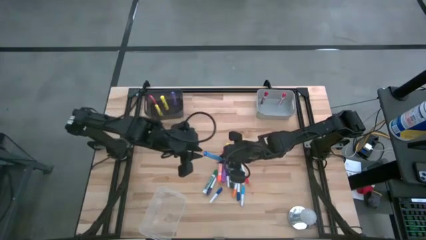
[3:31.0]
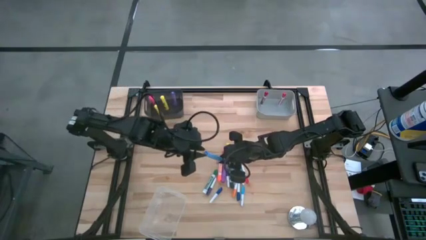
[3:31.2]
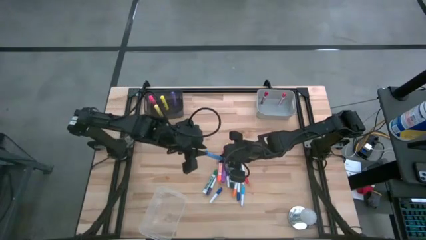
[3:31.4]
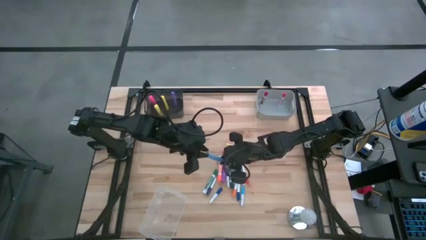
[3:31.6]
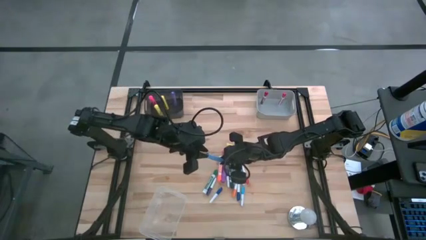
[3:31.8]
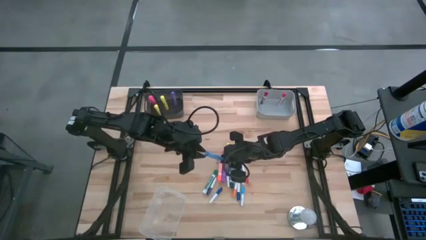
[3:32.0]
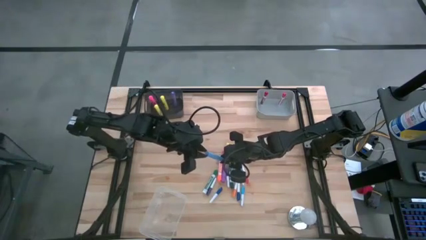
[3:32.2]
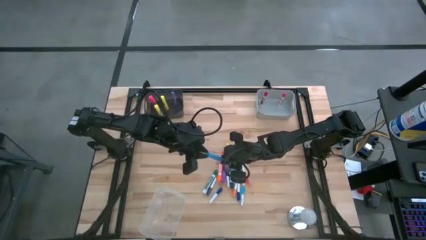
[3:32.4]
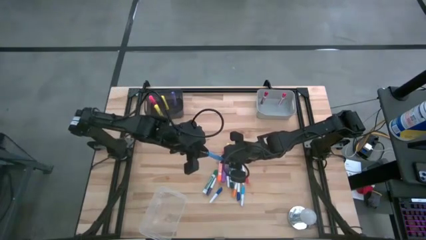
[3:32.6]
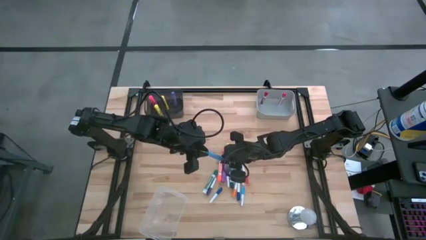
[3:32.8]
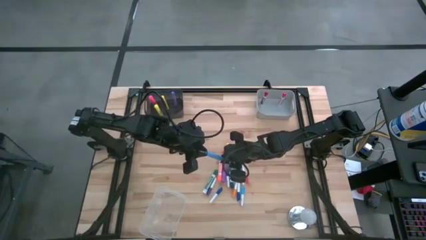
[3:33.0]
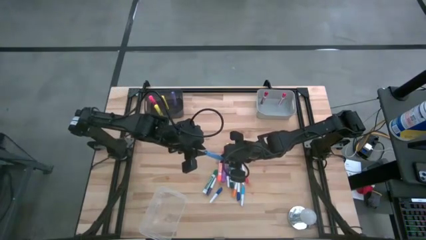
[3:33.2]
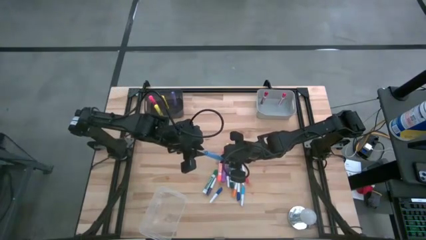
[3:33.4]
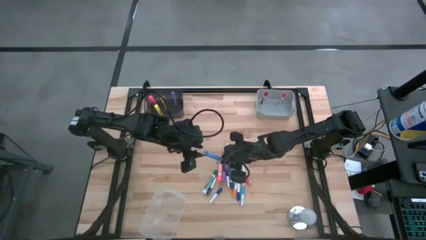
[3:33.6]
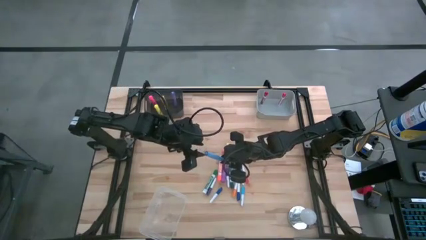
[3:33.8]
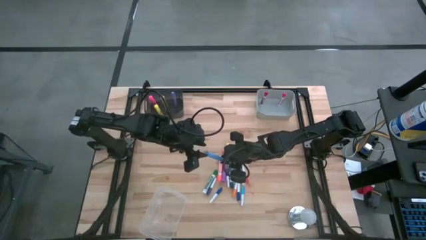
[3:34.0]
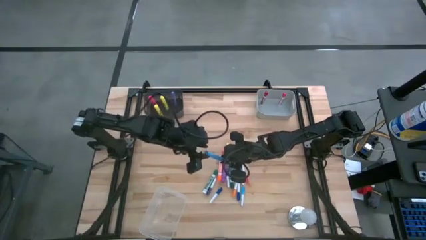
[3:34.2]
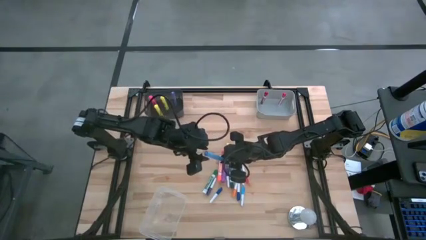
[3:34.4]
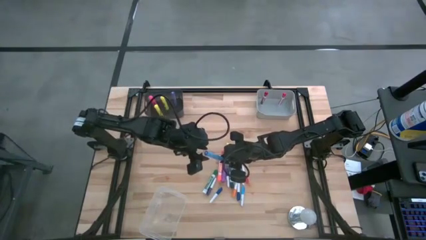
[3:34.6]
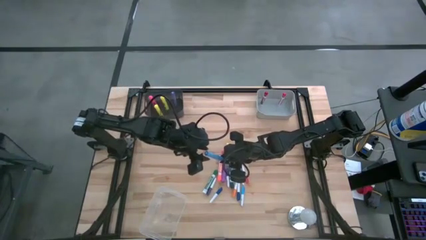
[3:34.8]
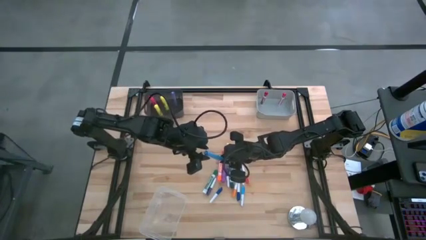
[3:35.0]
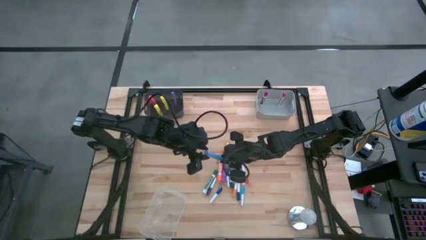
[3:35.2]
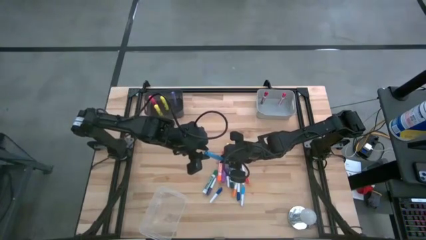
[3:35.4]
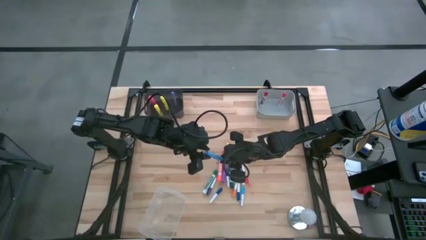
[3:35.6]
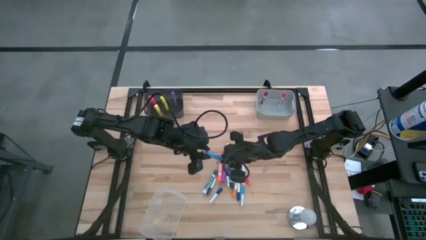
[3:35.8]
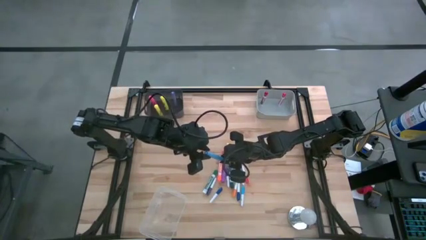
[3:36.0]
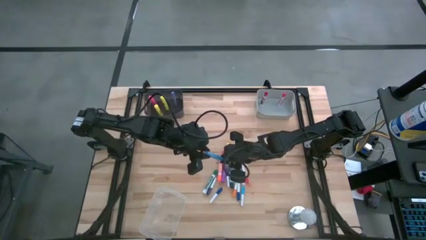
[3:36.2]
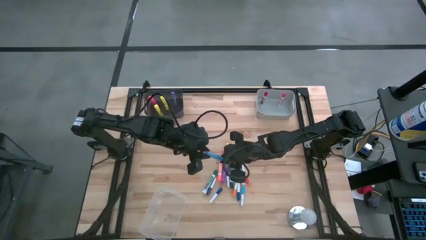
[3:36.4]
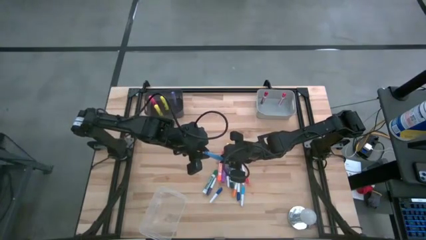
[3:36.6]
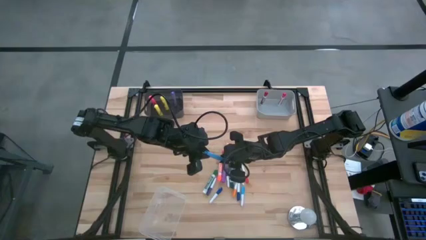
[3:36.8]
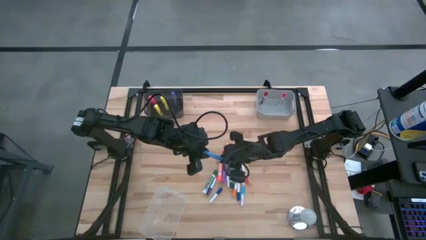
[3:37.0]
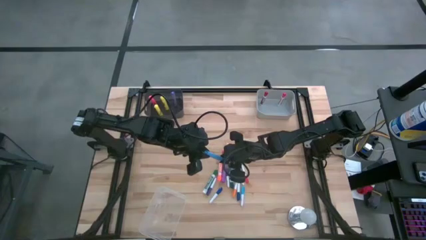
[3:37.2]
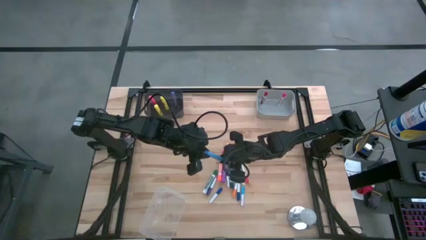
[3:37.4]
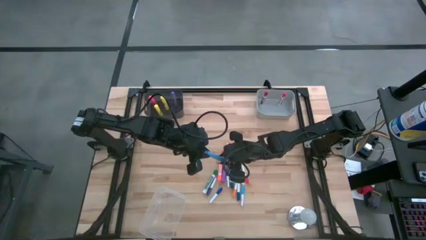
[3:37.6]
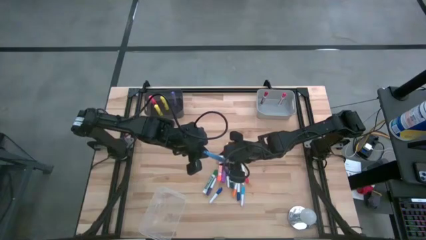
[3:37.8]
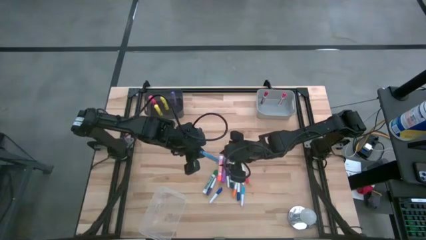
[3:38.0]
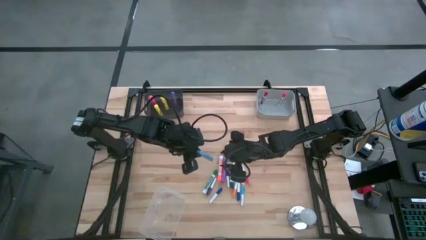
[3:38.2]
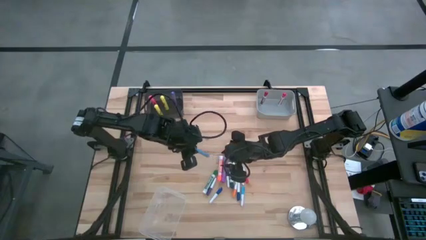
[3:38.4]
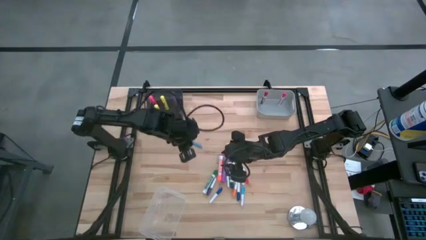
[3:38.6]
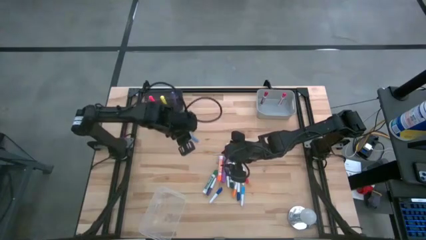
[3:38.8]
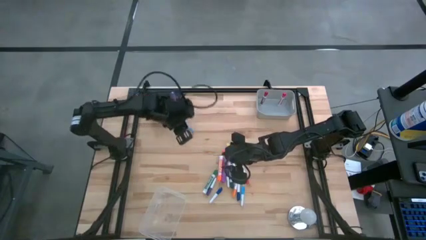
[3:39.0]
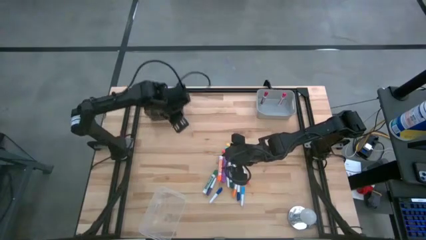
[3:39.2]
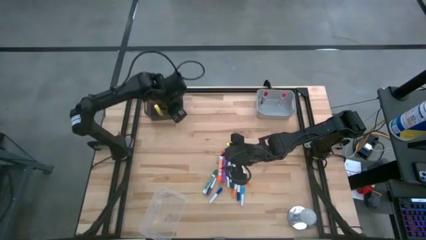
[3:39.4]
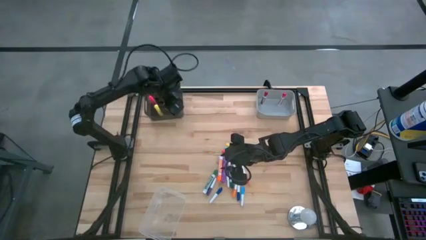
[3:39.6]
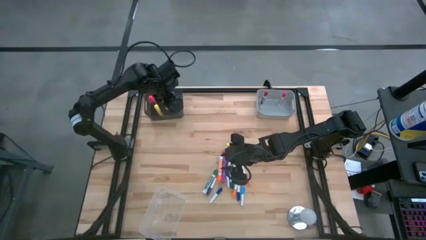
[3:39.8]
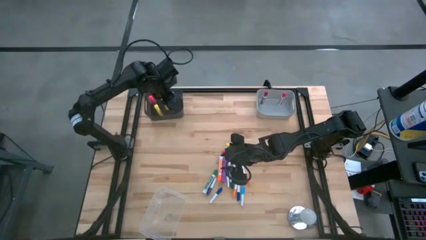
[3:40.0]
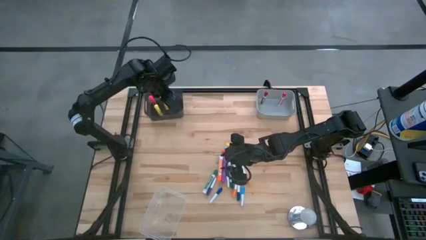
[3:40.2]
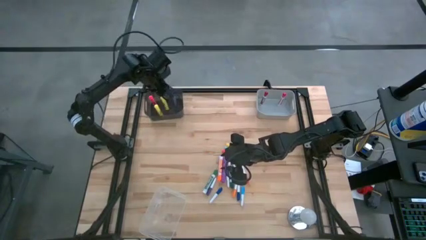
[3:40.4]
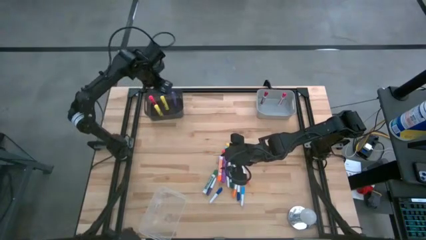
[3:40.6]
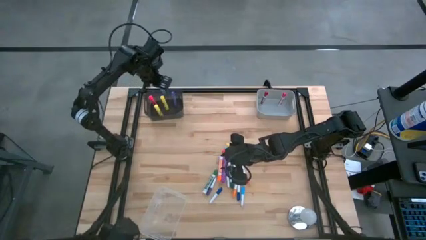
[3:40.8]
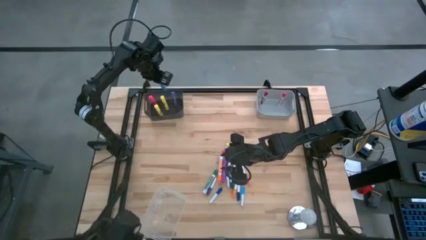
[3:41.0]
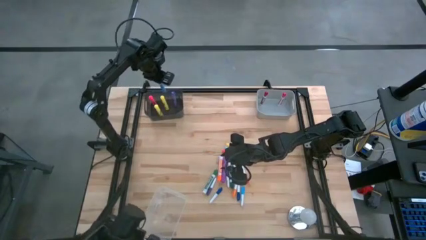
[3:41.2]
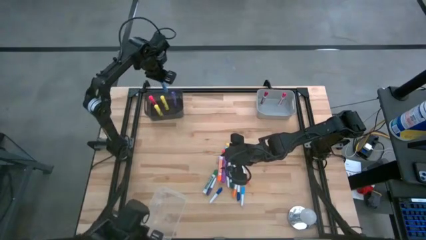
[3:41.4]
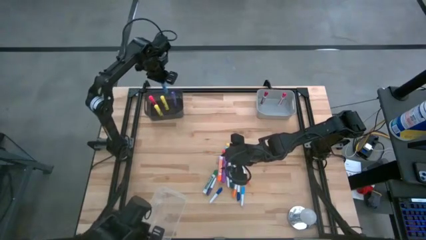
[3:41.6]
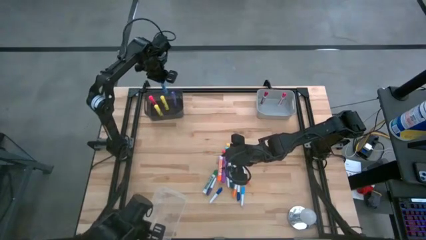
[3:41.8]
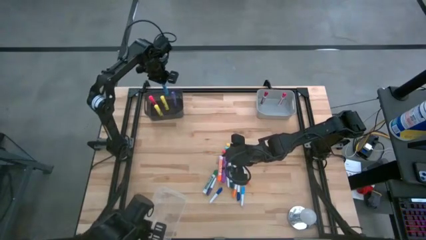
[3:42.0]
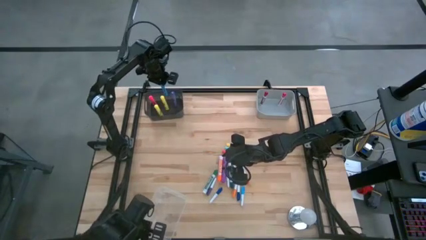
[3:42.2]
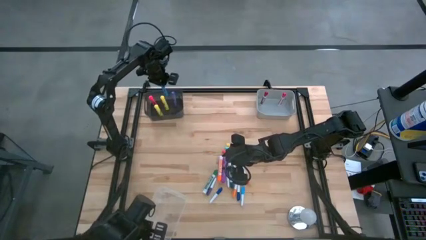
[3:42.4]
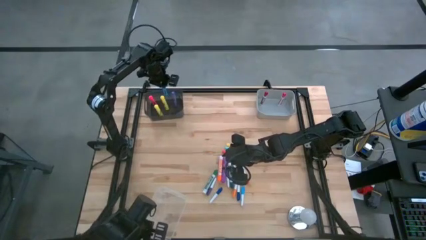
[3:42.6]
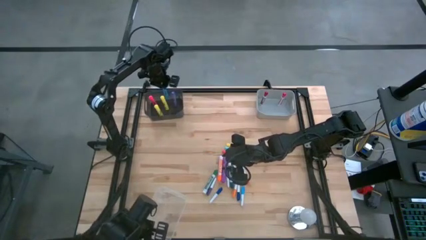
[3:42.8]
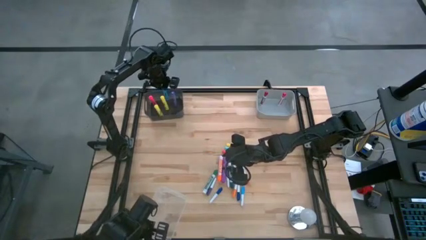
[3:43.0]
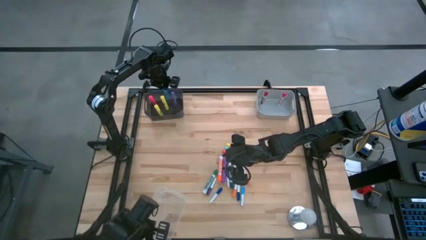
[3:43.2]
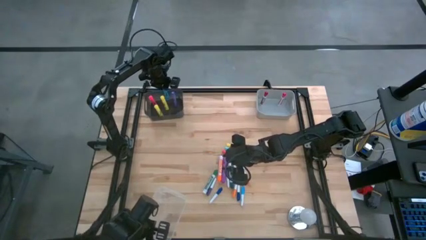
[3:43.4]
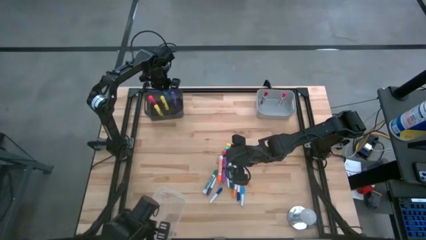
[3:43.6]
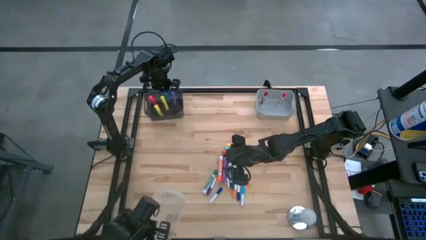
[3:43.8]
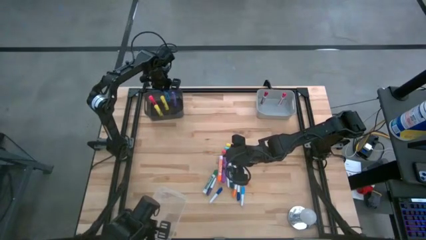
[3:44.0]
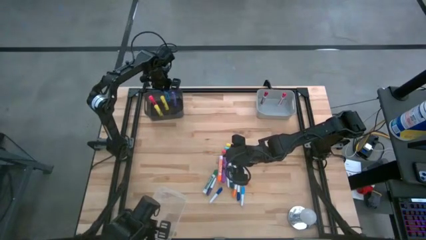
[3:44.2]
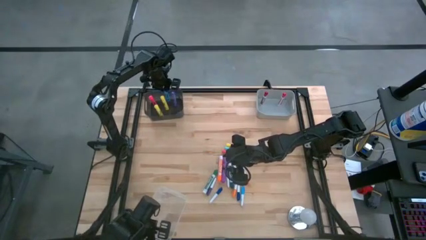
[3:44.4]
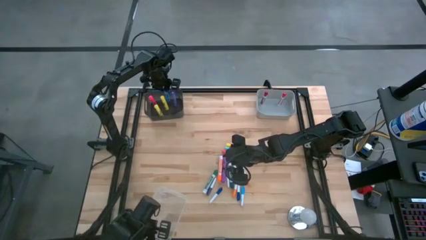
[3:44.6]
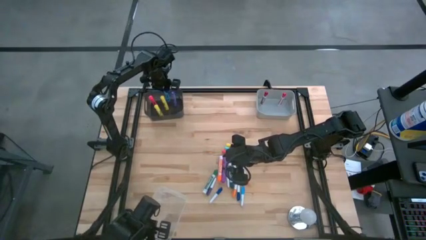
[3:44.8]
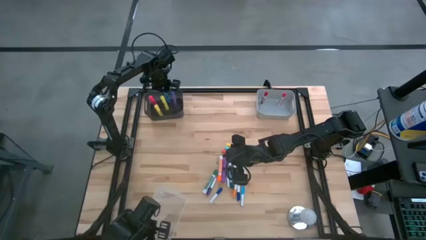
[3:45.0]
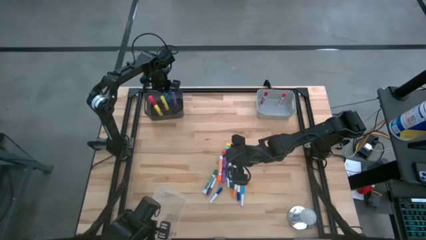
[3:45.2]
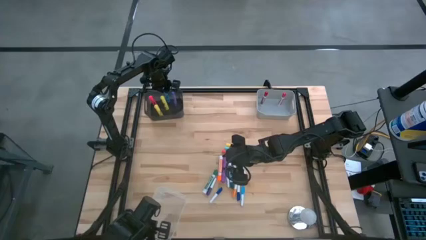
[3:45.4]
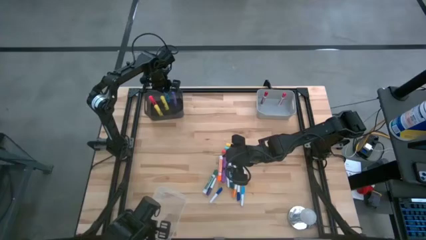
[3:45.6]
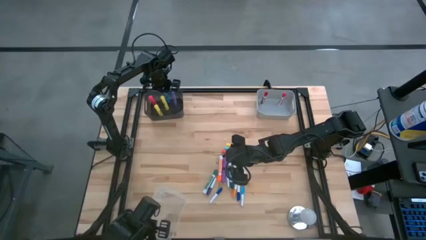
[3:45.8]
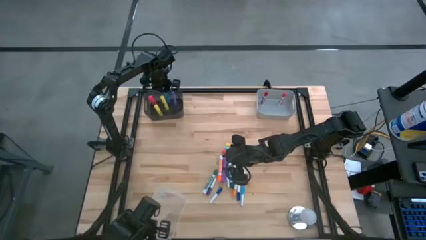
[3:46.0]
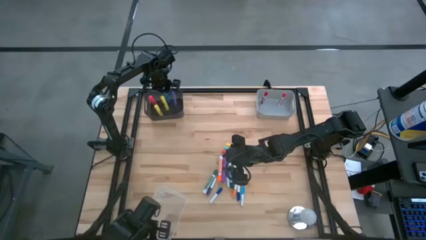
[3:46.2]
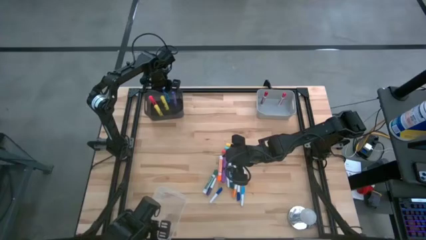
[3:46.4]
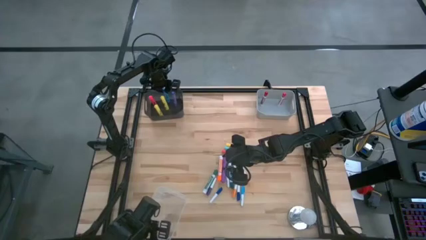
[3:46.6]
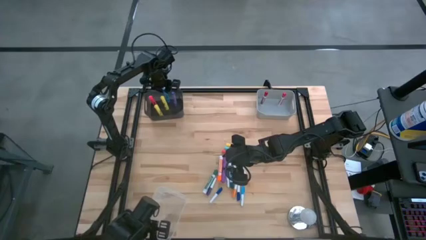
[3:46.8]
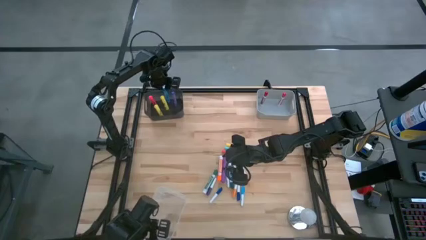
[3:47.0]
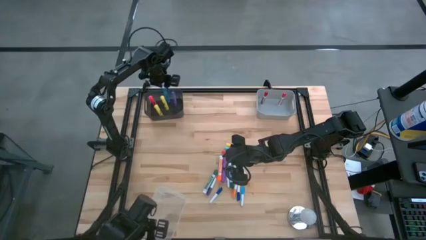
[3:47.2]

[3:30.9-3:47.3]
Task: Pick & Place Markers
Put the blue highlighter pen into the black bin
